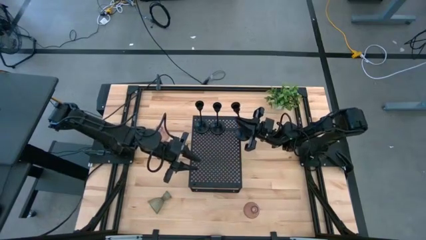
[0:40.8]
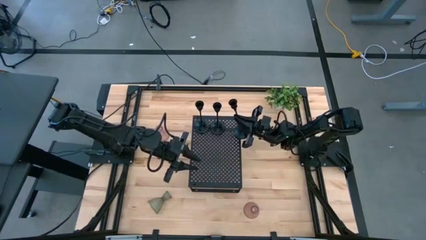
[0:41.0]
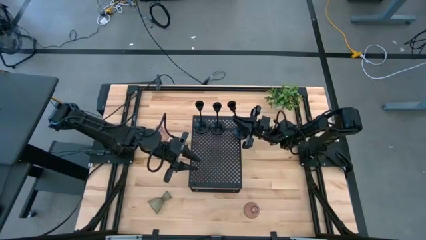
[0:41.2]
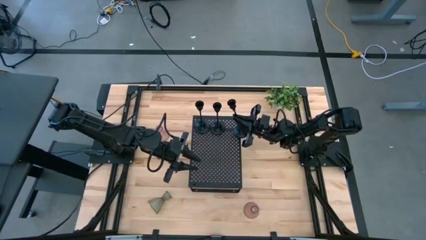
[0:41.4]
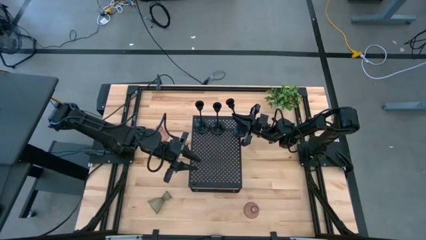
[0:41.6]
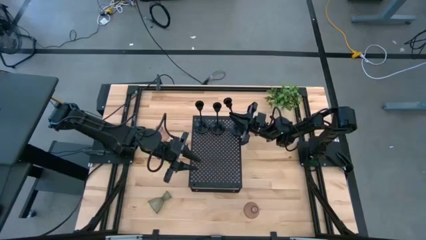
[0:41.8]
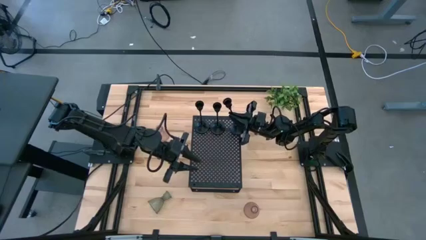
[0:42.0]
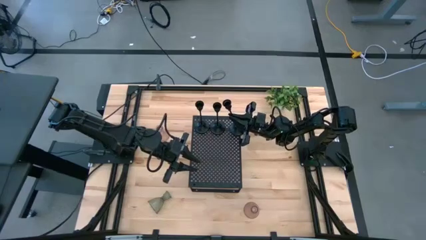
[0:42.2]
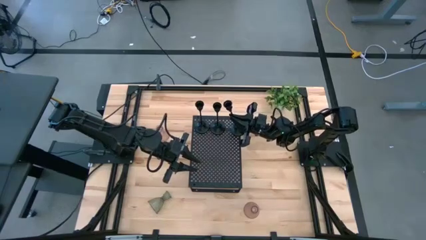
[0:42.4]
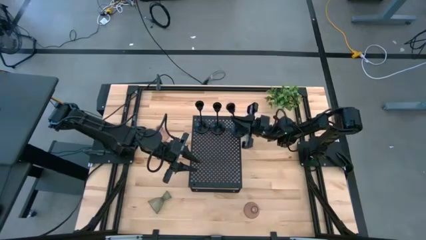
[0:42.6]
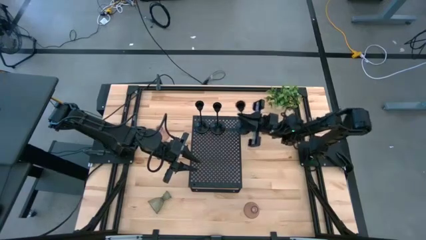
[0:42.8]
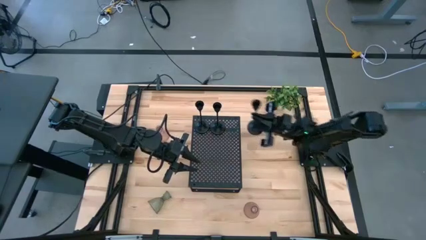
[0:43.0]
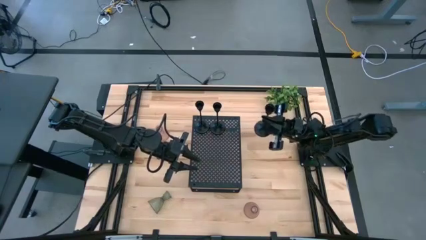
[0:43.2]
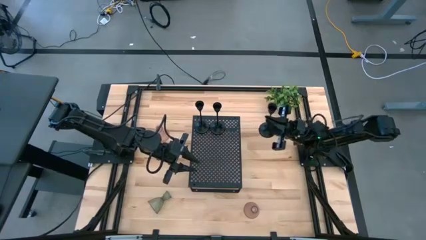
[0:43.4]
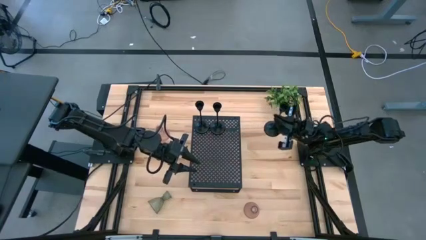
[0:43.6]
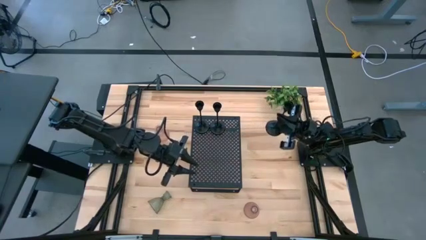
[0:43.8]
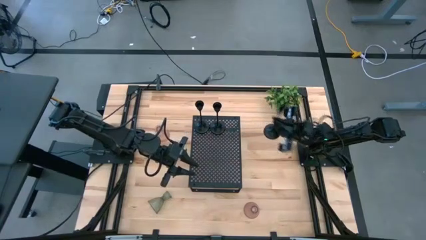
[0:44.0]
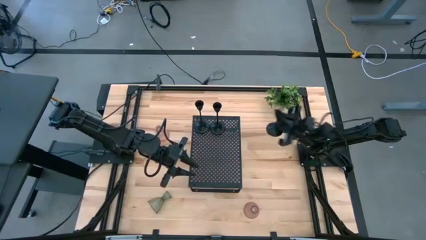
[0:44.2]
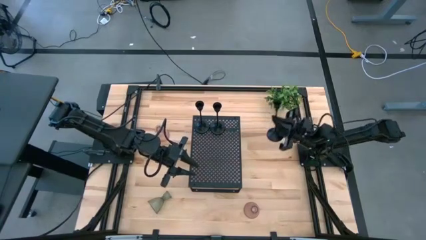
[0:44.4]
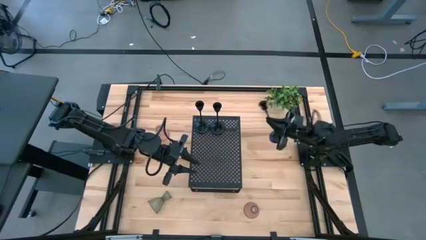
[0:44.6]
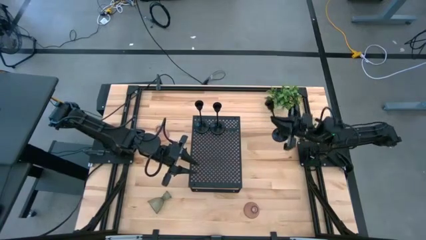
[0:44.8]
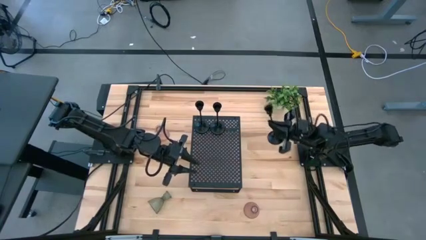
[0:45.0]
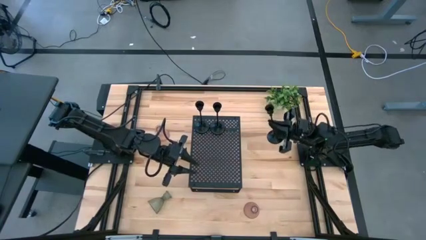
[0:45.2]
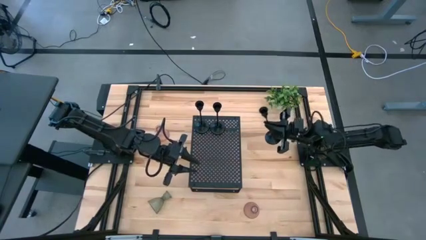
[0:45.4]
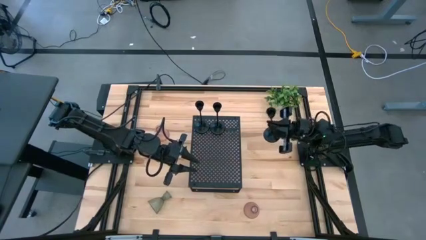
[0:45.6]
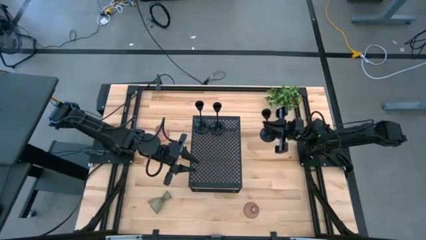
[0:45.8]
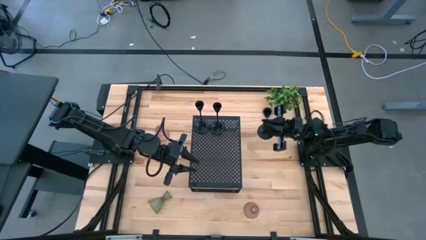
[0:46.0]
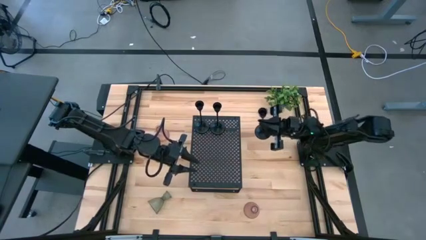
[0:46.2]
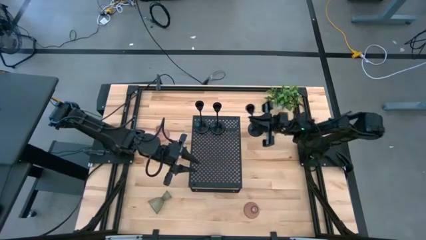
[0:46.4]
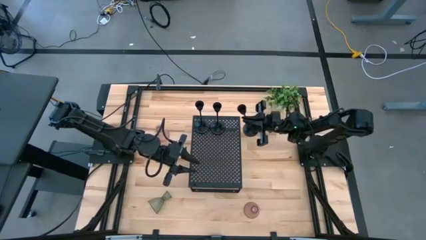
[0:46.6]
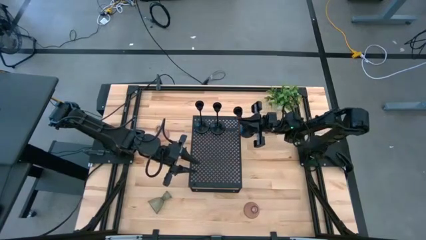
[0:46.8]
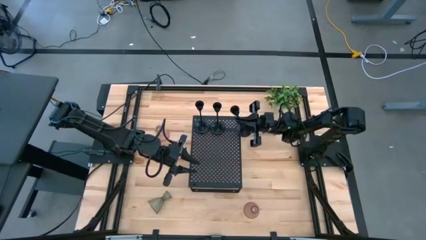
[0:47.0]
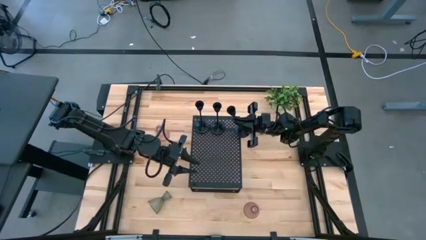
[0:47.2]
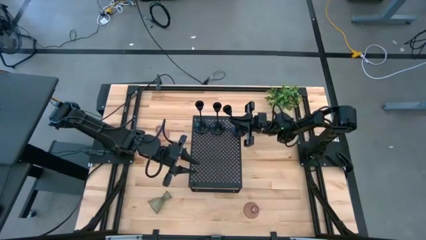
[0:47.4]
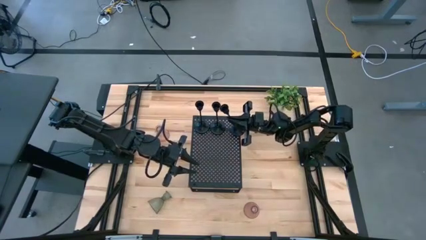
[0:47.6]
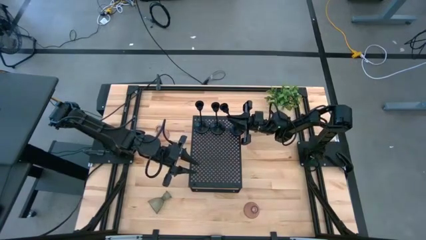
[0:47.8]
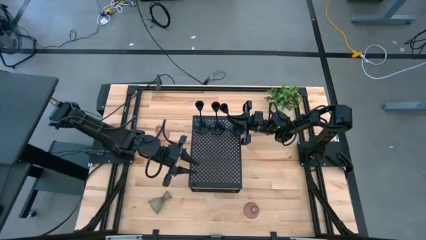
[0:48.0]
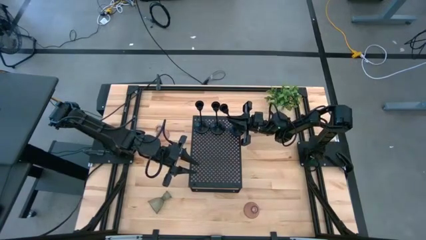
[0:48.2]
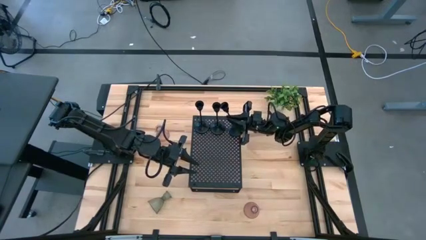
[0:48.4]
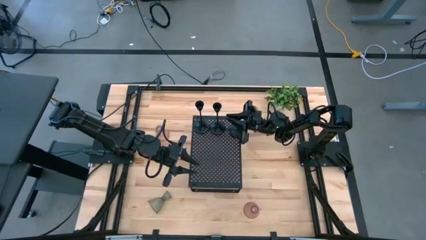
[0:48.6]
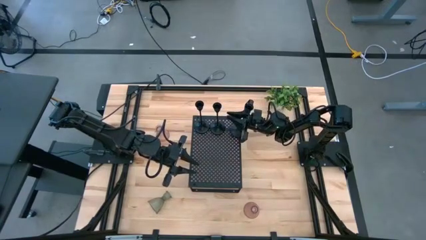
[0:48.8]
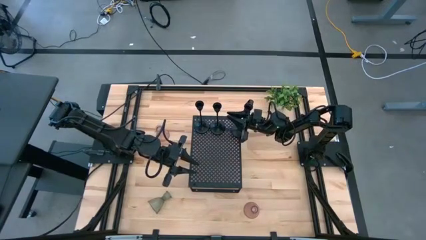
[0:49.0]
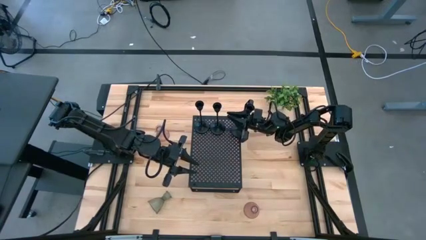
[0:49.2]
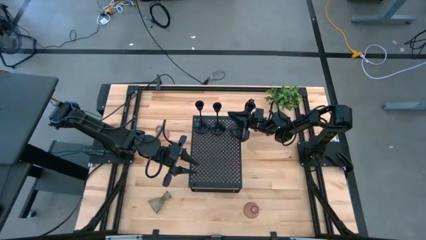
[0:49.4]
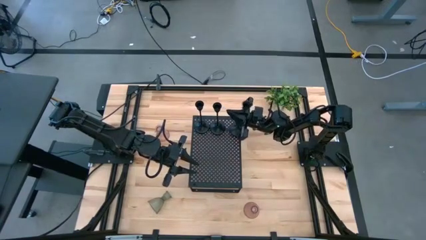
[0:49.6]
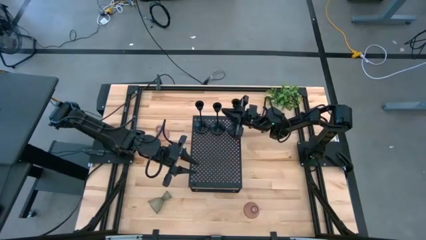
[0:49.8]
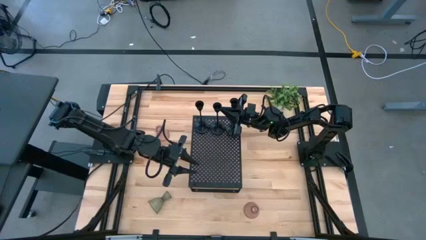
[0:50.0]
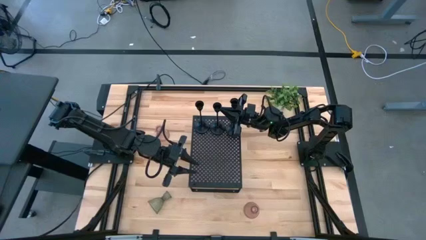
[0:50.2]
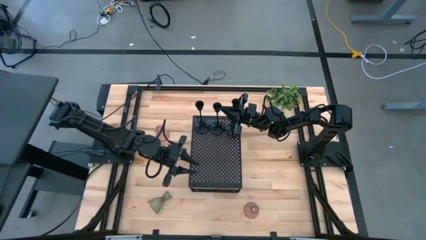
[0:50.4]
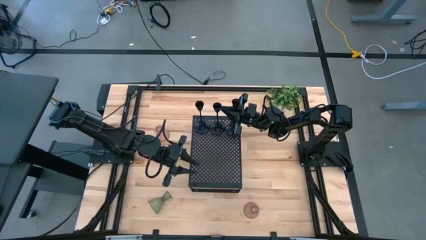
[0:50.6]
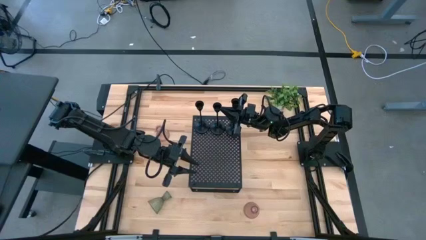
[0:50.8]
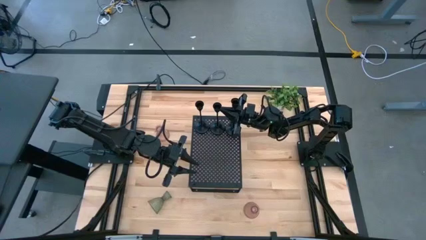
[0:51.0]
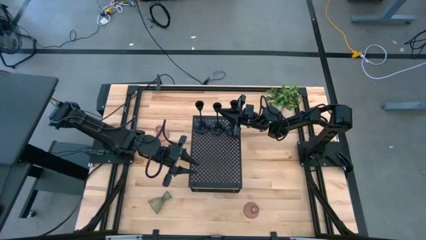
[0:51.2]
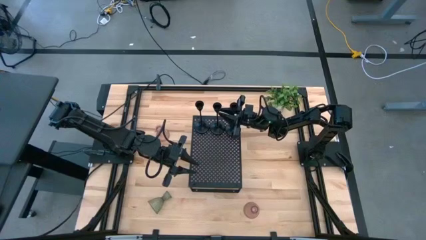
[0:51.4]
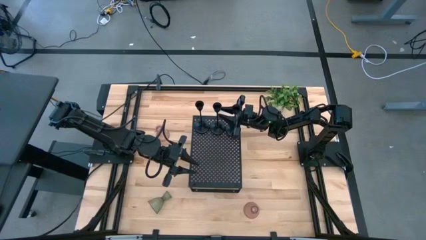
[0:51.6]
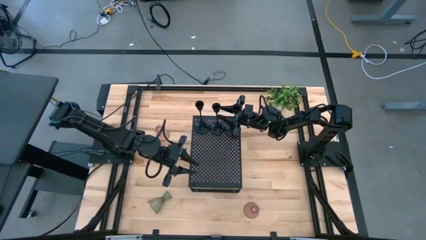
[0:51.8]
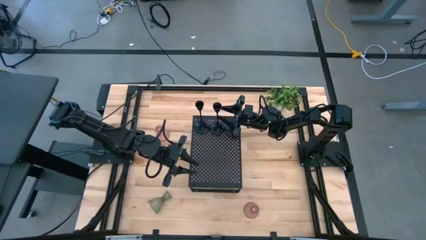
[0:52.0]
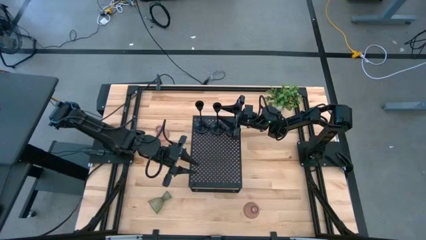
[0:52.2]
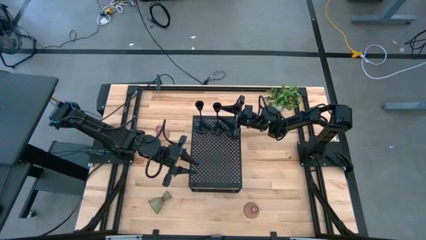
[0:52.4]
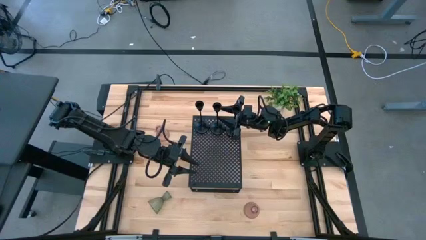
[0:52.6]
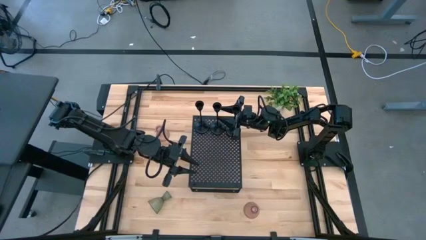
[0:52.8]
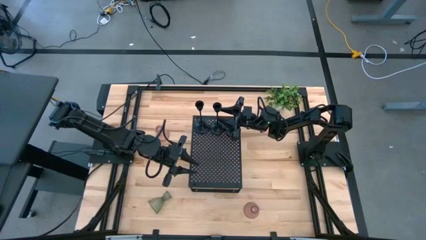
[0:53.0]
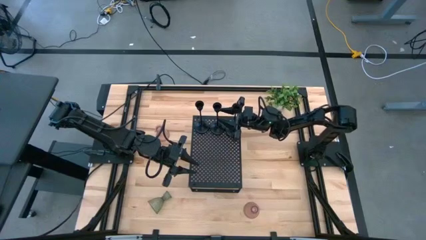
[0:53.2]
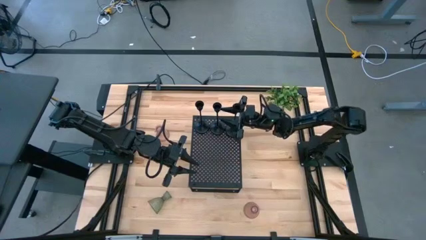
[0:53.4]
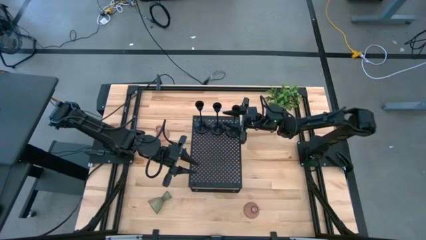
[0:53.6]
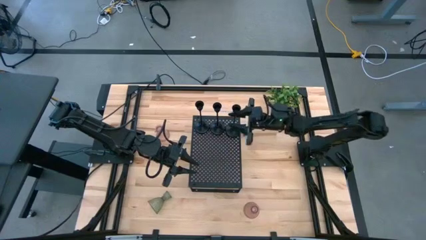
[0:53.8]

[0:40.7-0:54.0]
Task: Pick & Place candle stick holders
Put the black candle holder on the shelf aligned with the other black candle holder

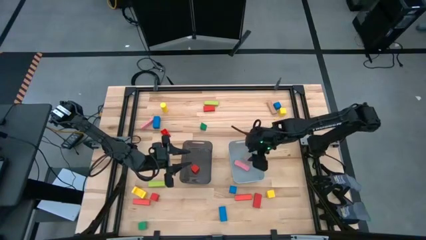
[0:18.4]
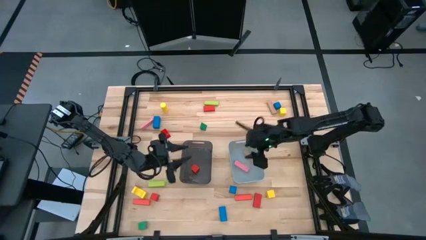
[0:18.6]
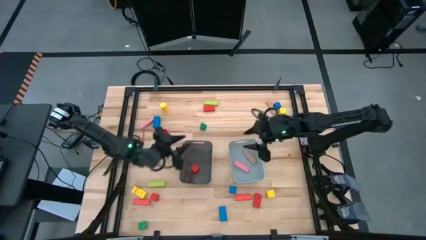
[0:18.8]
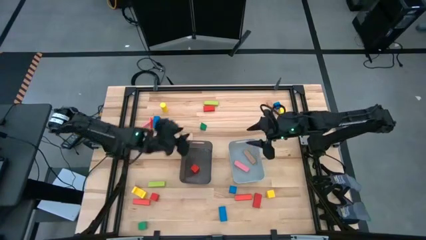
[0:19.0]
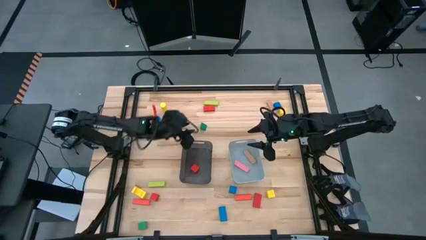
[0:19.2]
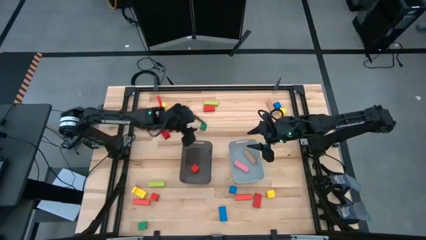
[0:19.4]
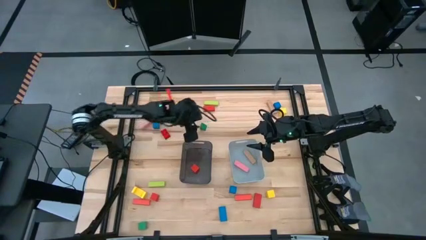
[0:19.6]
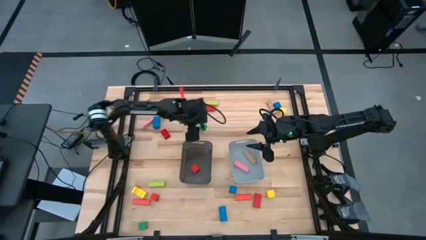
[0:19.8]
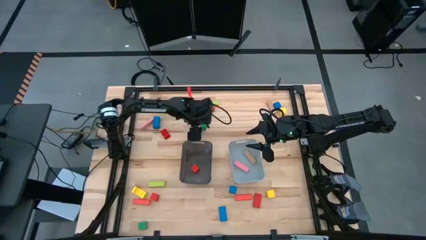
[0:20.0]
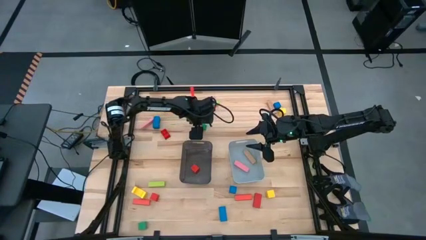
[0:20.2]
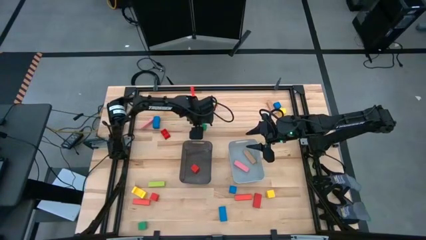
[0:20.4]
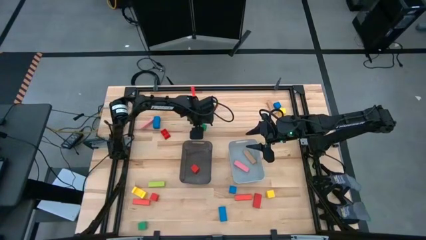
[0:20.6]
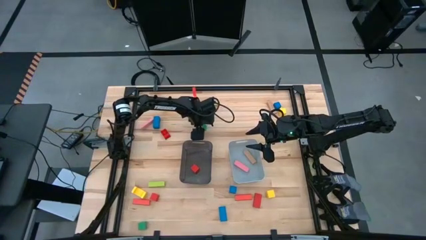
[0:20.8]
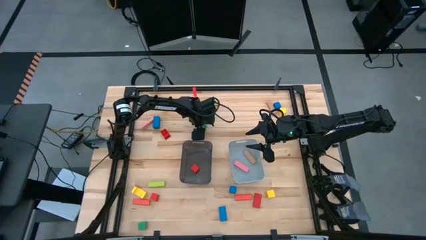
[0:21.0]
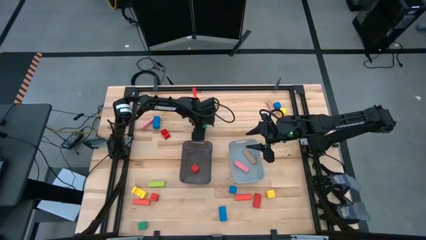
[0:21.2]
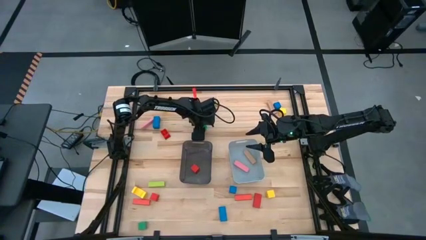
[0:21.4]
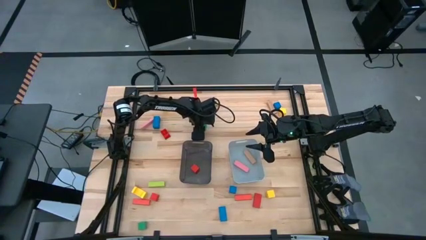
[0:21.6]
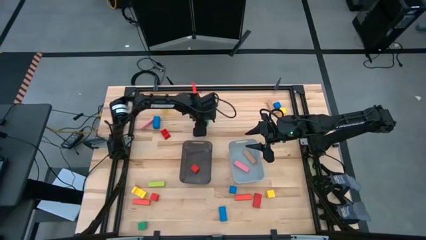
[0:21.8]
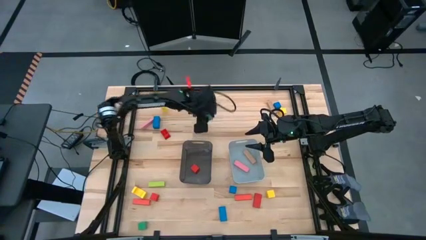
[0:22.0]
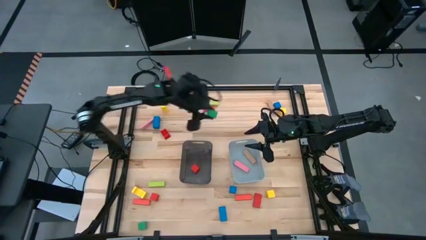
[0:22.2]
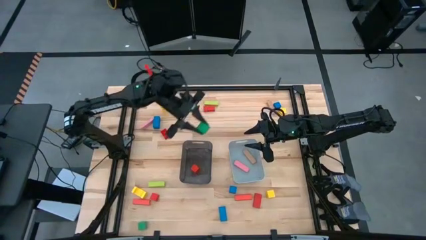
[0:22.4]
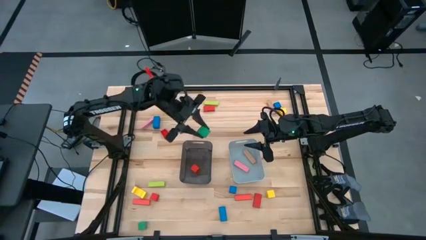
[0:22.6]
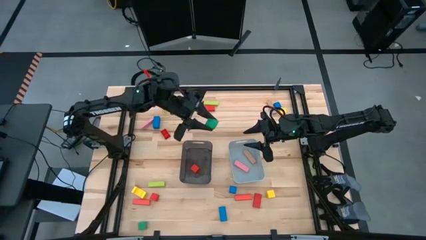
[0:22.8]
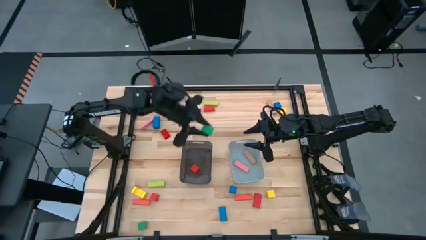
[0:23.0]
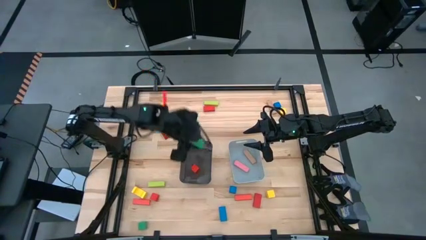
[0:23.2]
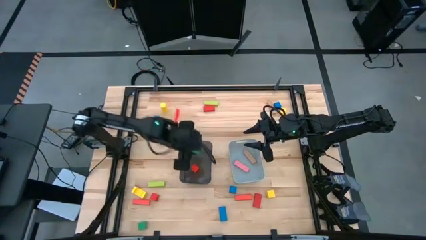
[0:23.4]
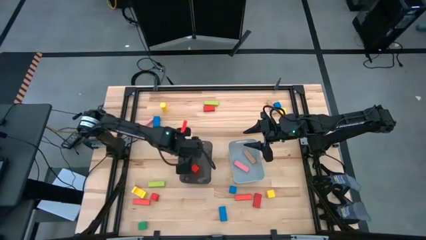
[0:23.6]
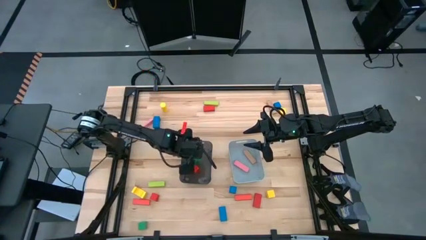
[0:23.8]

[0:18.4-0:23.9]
Task: Sort blocks by size
Put the top small green block into the black bin
